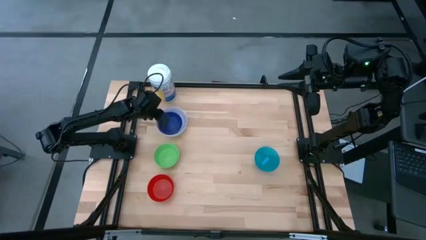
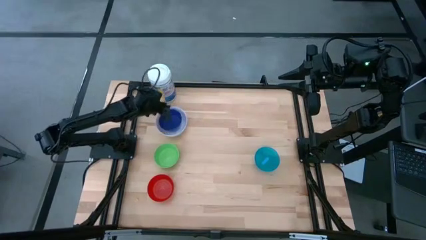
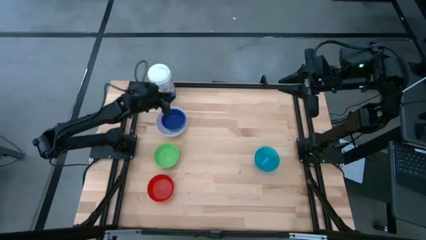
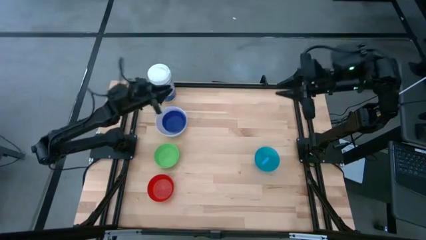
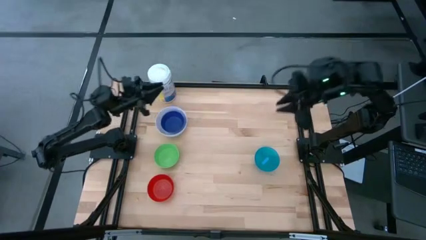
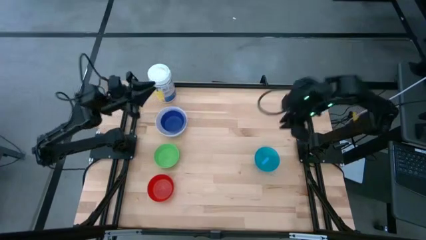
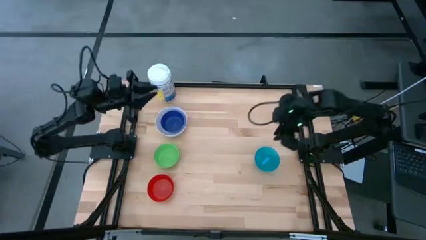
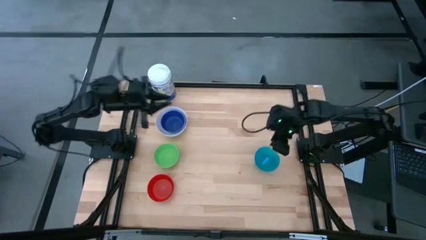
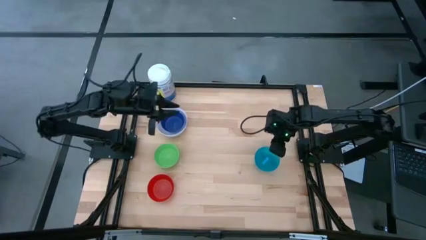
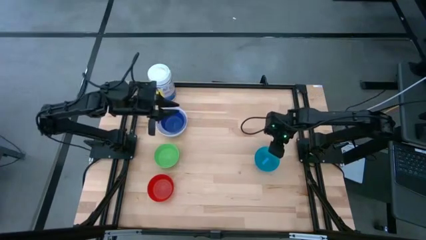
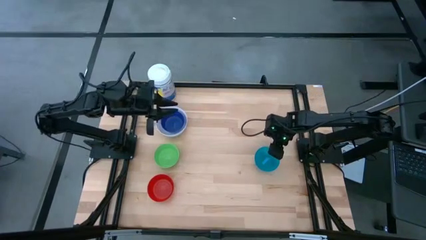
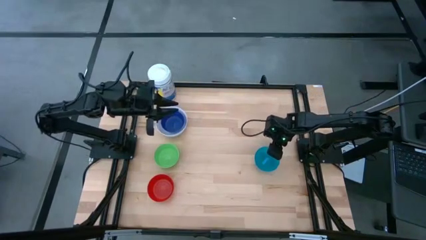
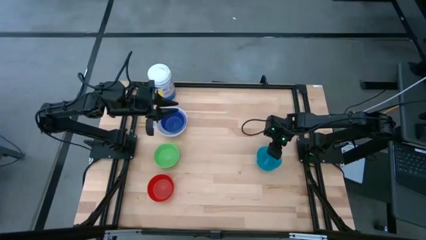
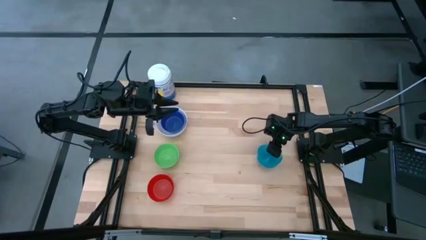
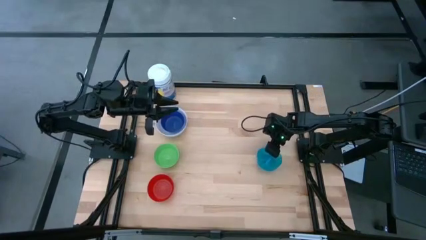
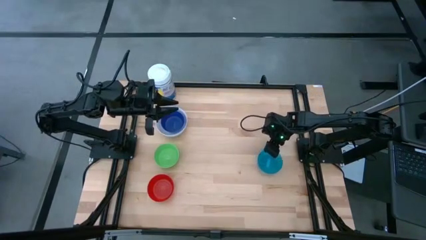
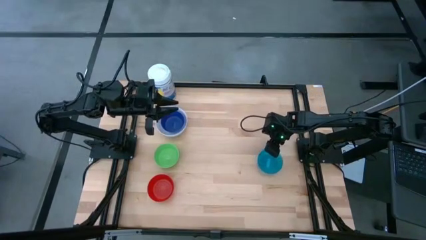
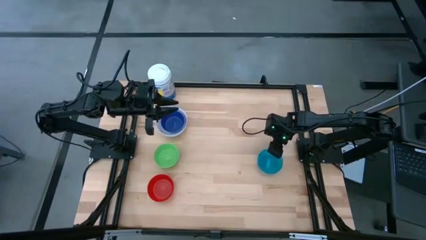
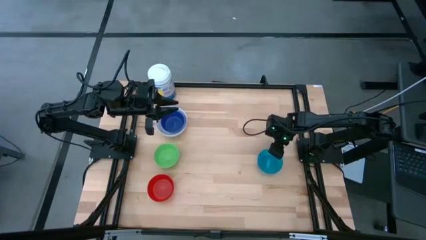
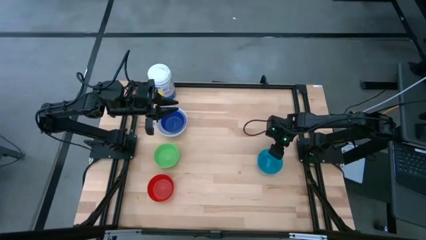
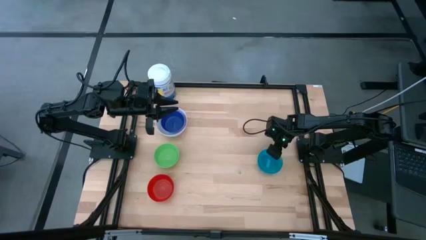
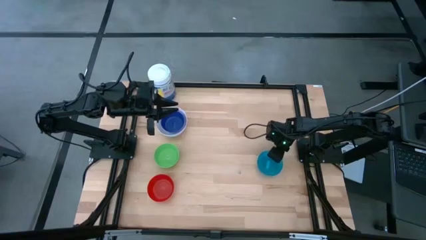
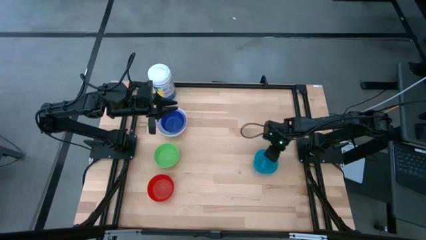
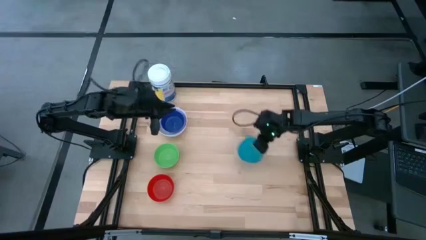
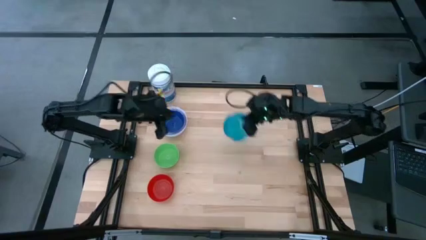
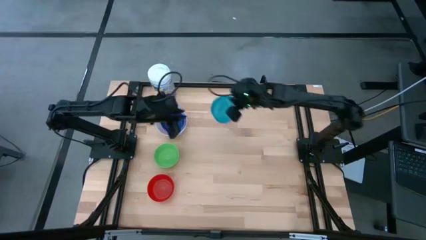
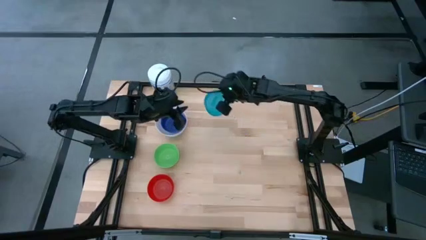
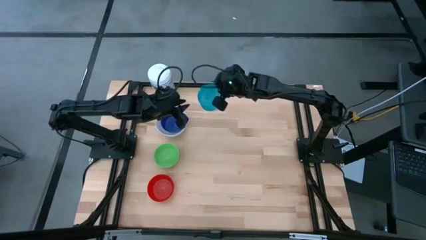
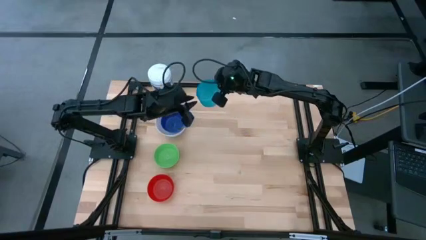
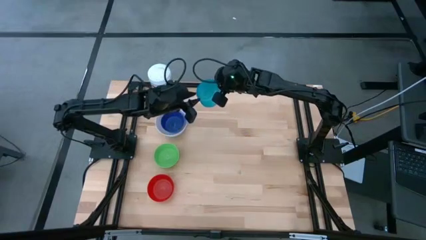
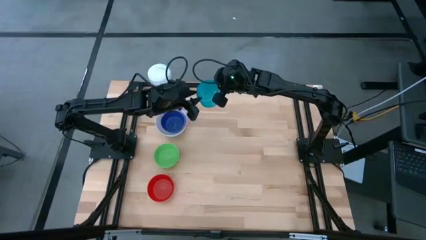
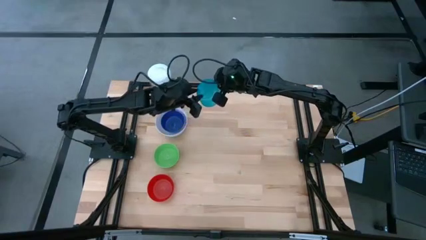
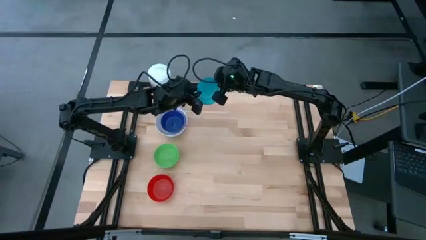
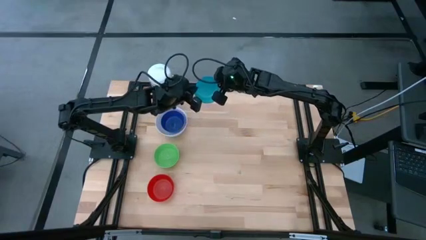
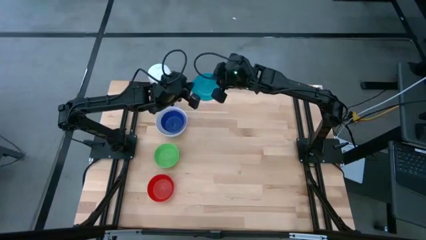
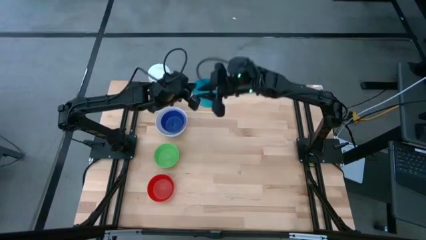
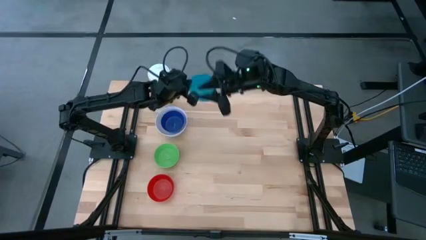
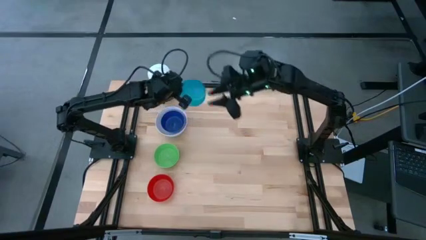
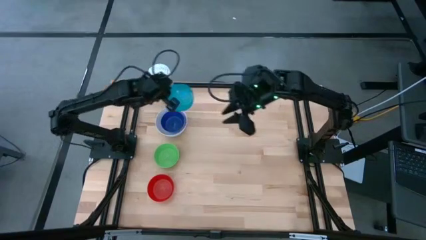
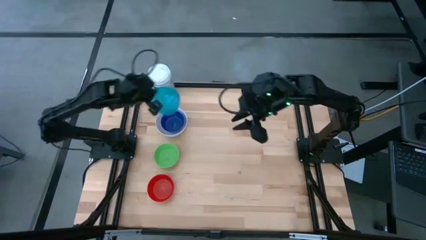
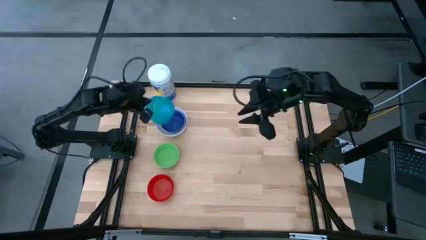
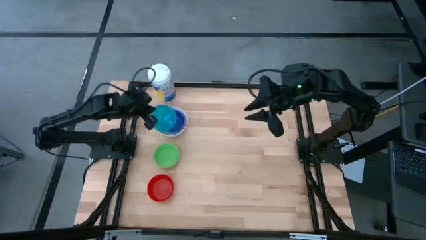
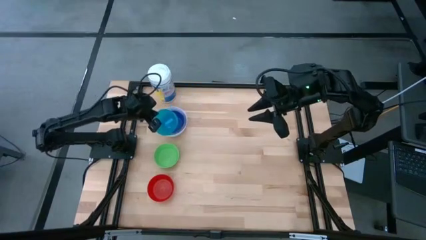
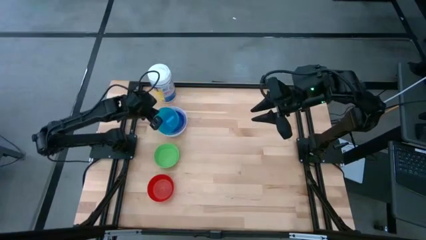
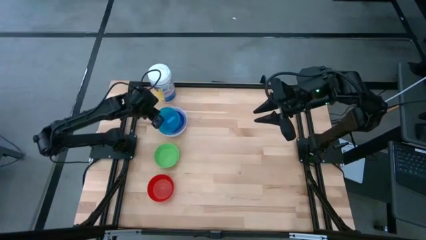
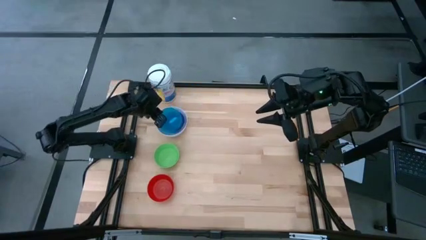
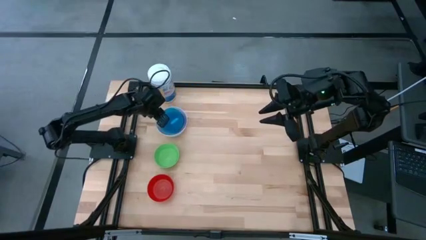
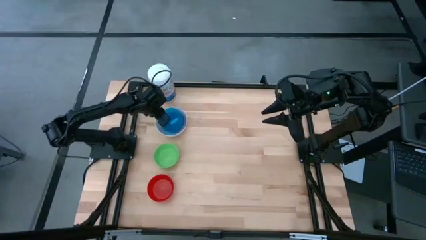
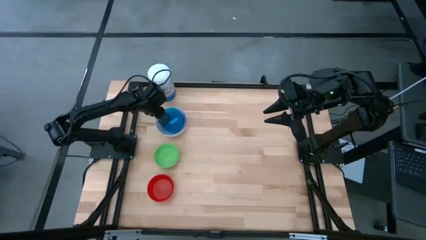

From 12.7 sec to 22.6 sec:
Stack the light blue bowl on top of the blue bowl

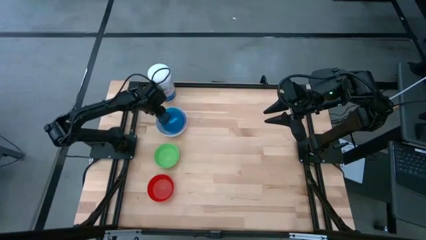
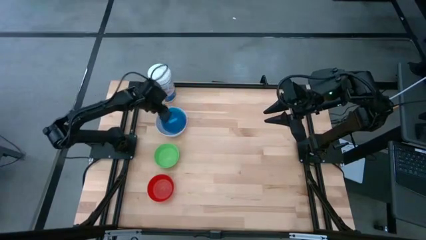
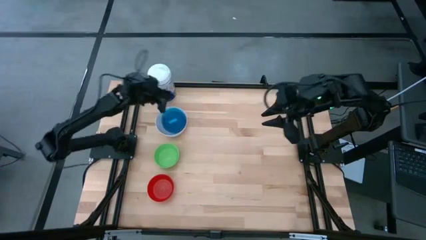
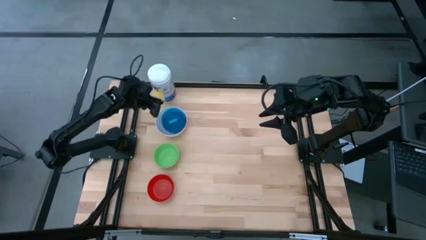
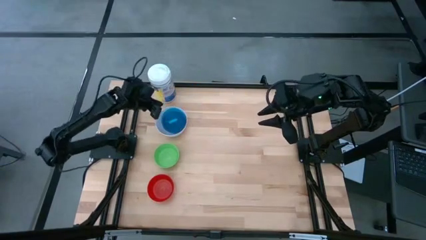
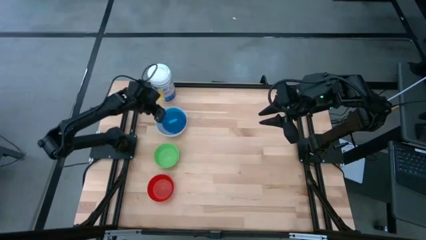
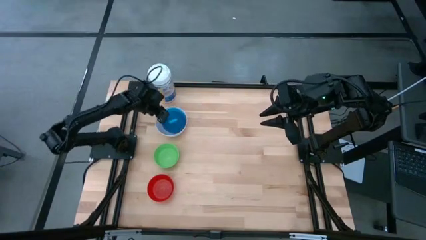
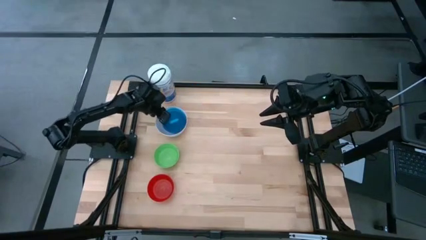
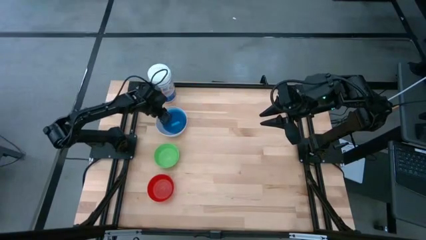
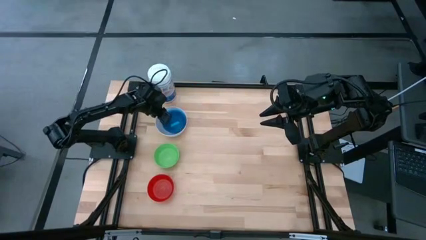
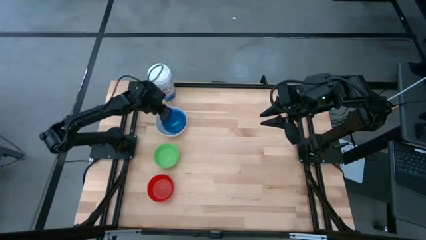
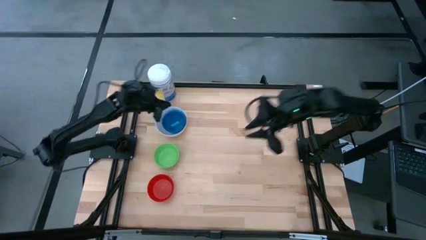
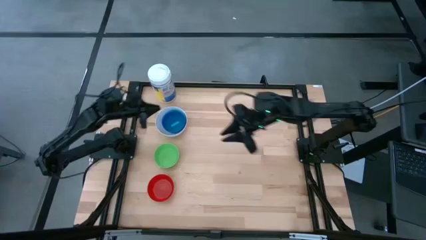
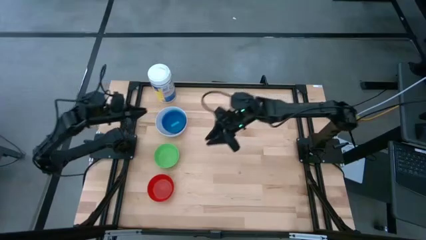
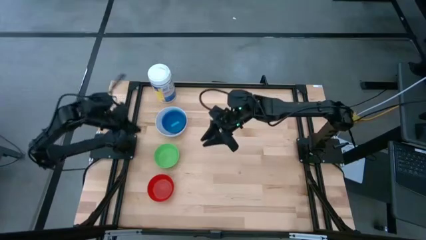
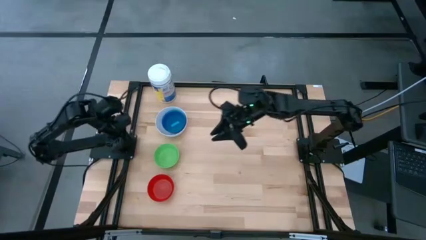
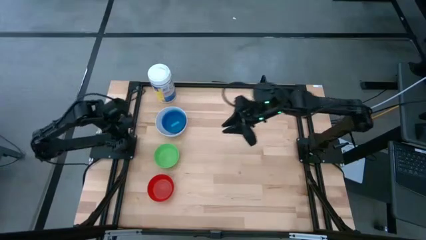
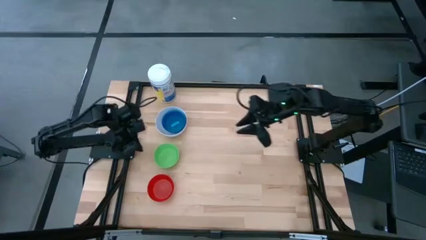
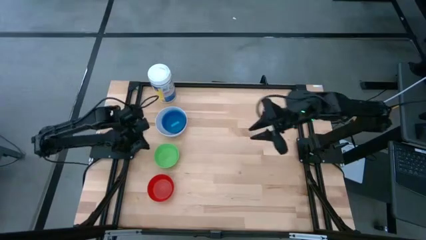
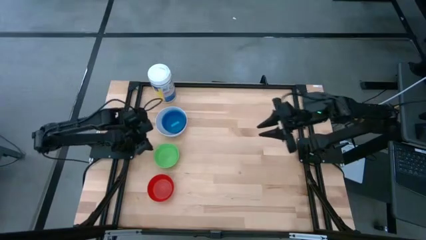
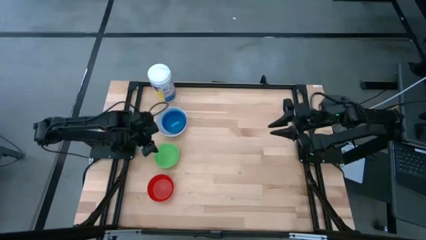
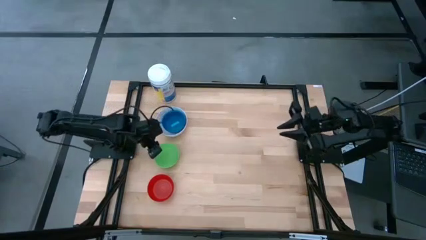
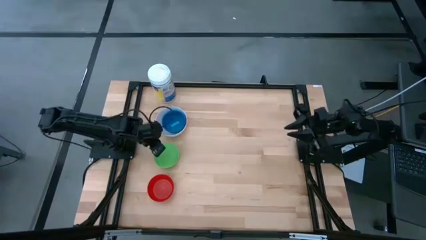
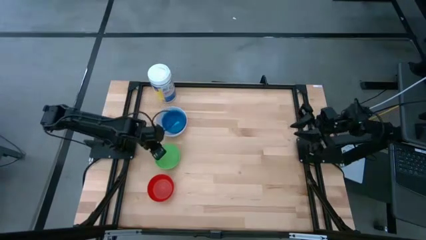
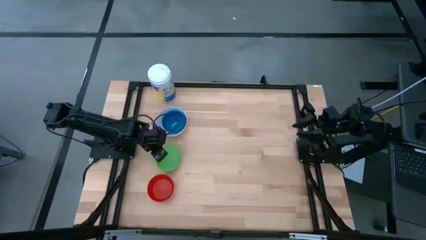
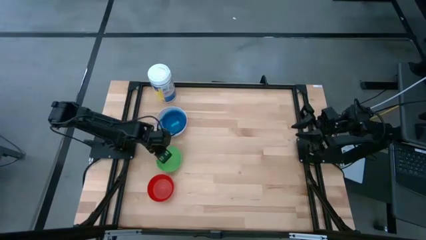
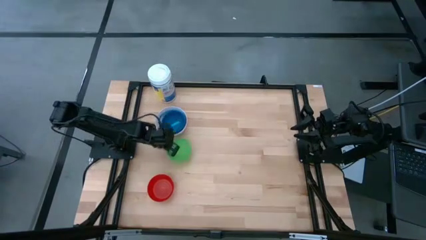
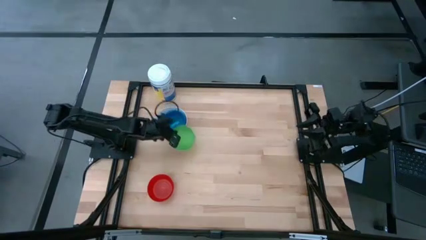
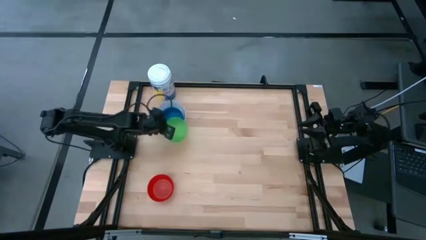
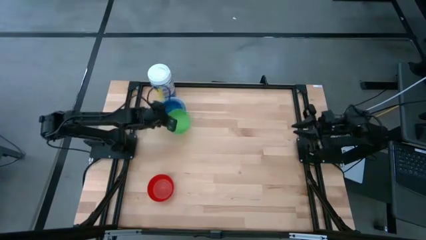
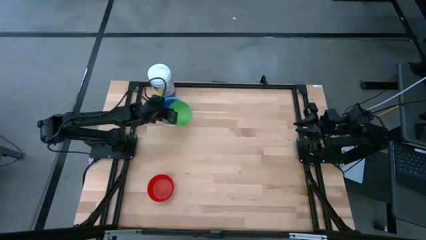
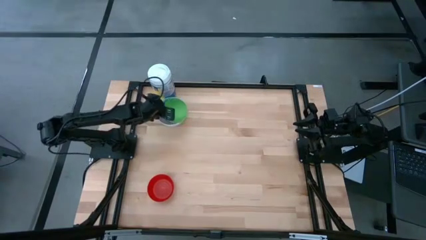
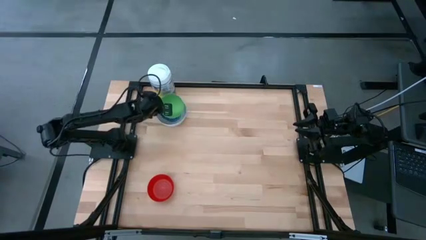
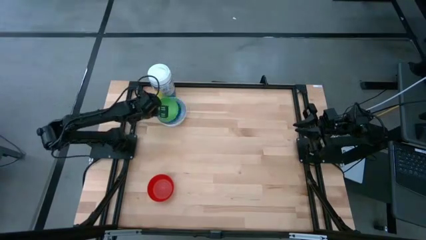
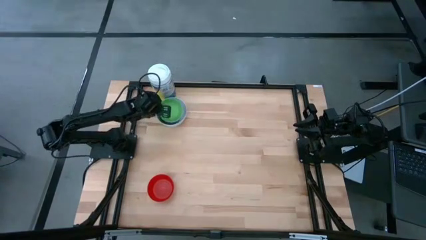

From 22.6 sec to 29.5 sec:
Stack the green bowl on top of the light blue bowl
